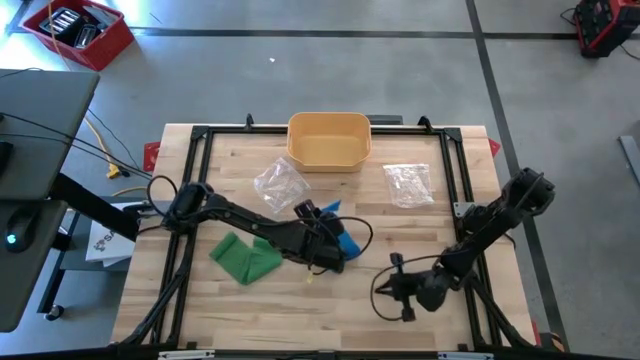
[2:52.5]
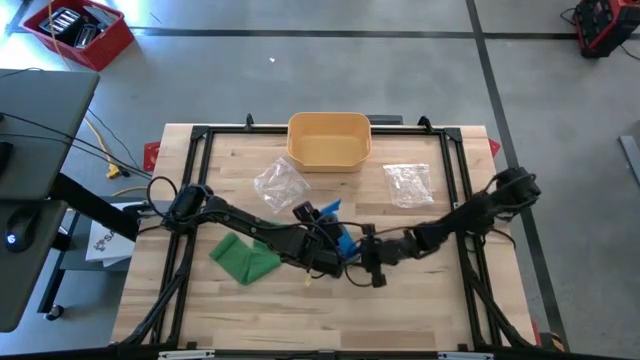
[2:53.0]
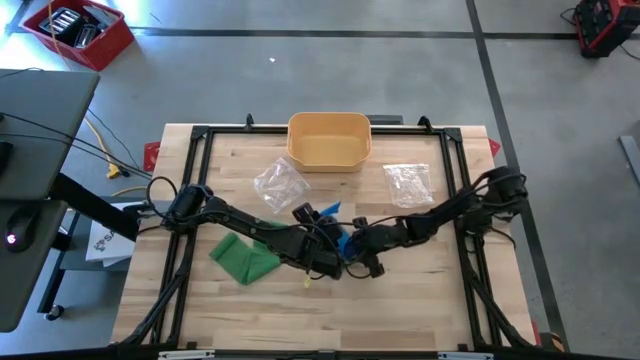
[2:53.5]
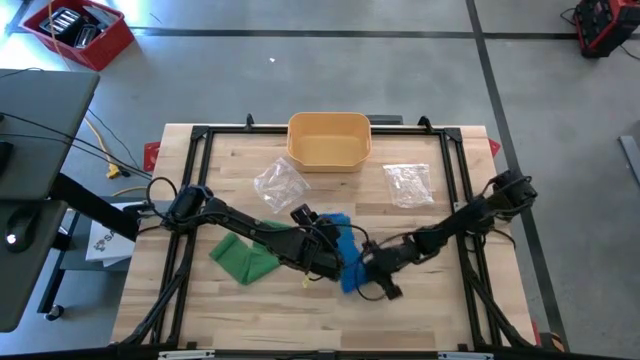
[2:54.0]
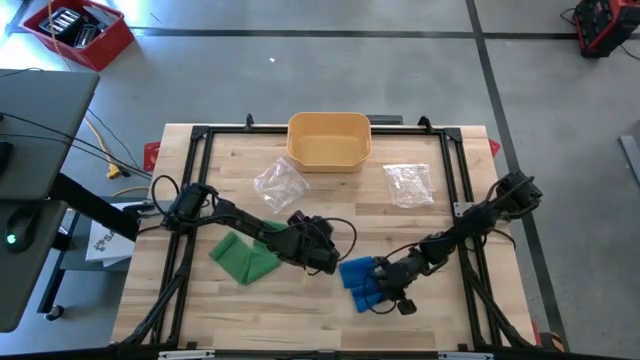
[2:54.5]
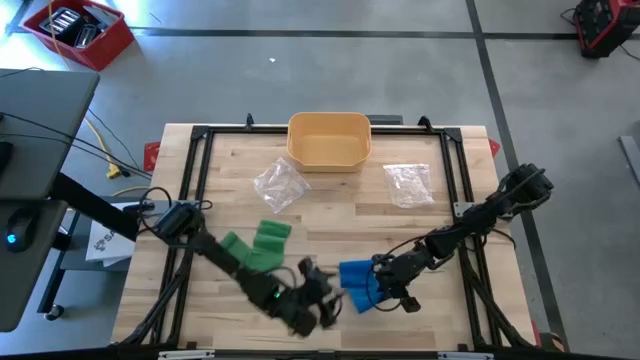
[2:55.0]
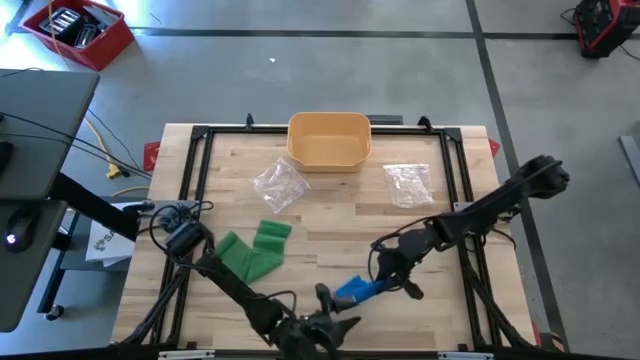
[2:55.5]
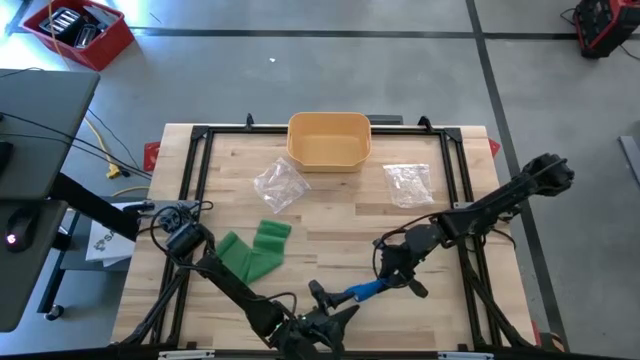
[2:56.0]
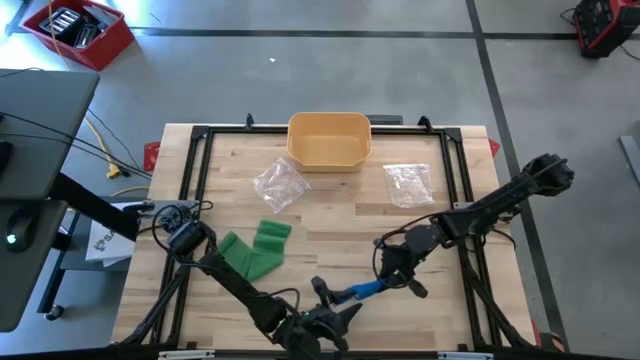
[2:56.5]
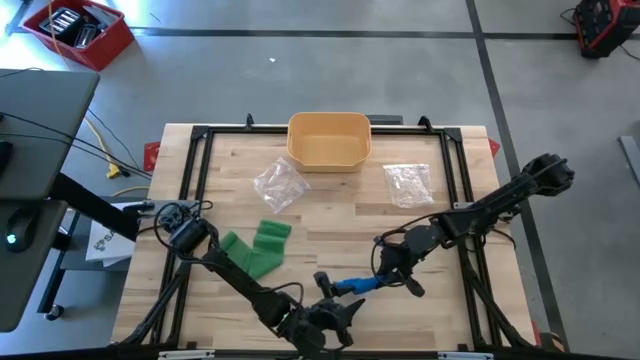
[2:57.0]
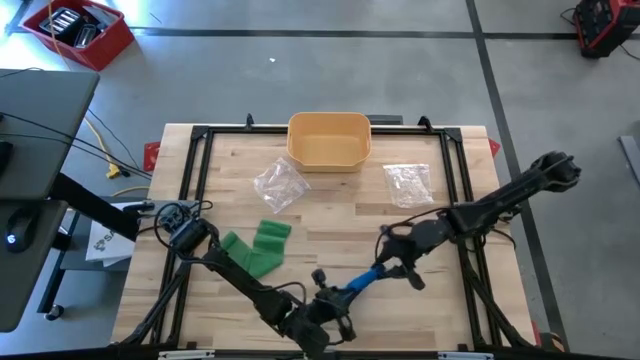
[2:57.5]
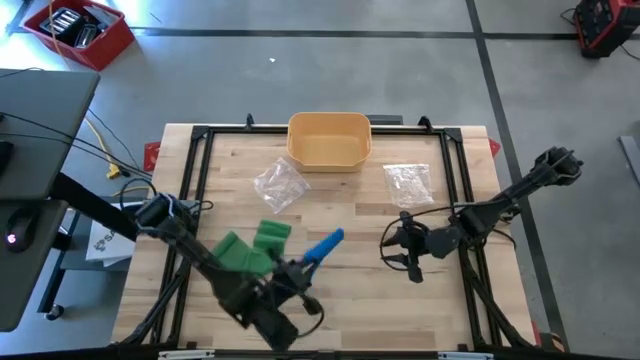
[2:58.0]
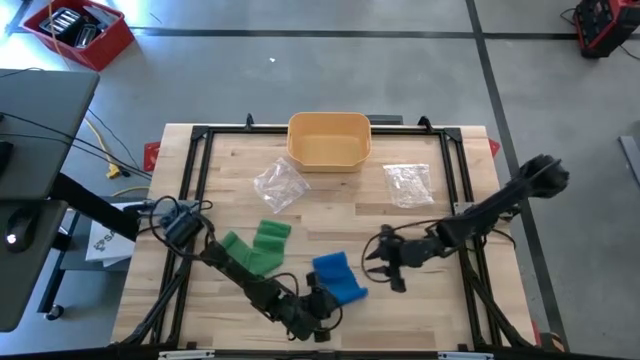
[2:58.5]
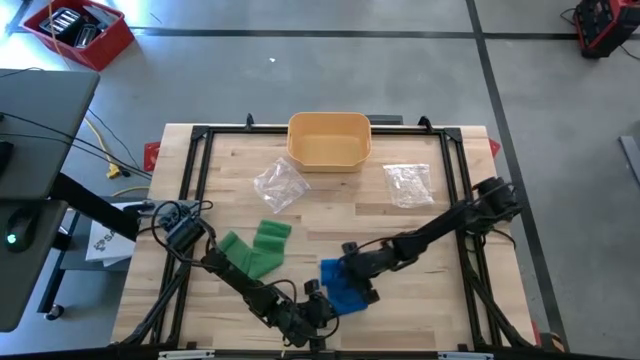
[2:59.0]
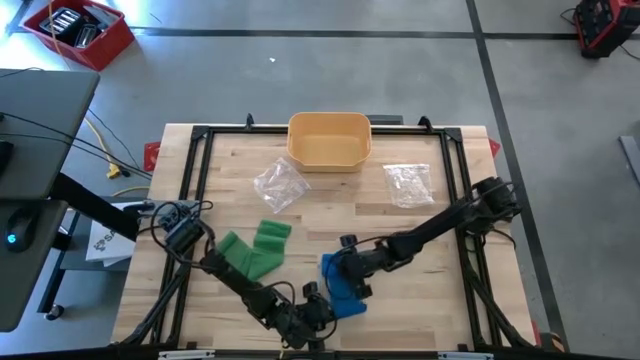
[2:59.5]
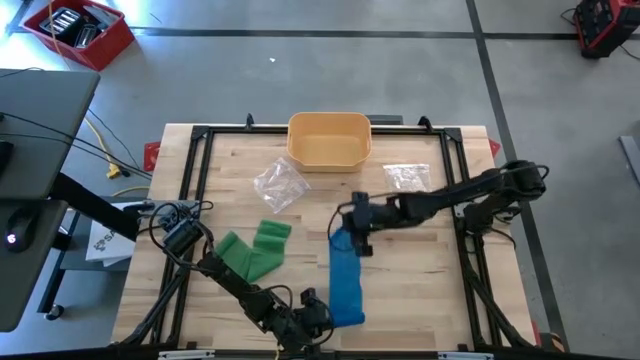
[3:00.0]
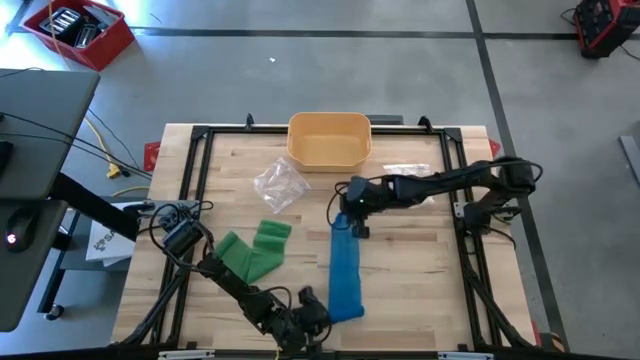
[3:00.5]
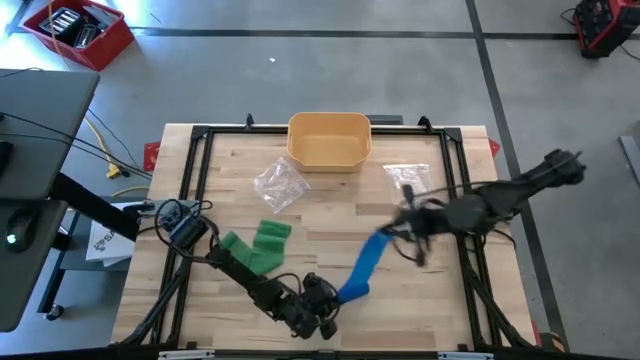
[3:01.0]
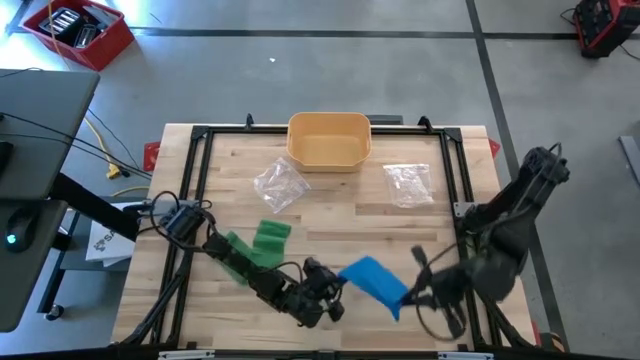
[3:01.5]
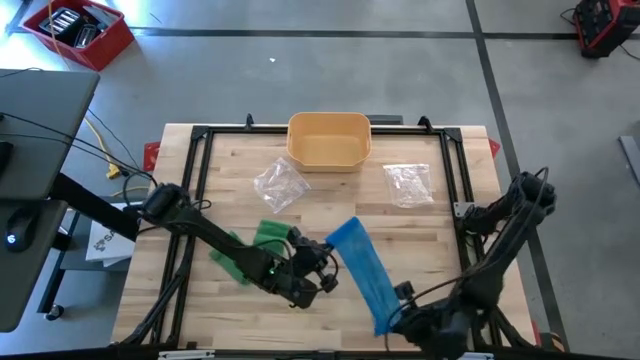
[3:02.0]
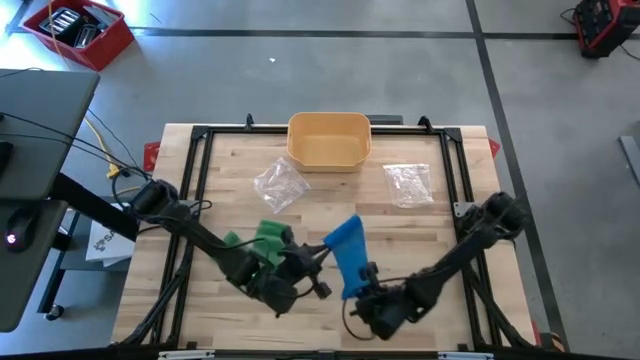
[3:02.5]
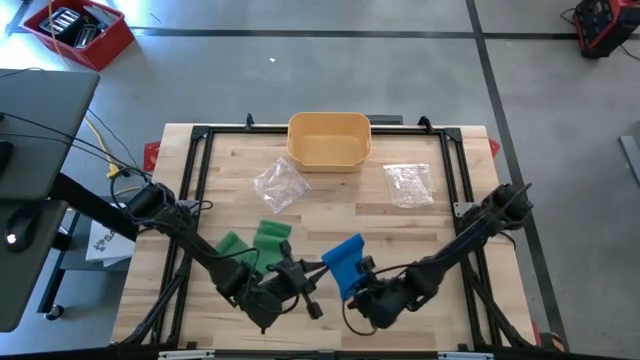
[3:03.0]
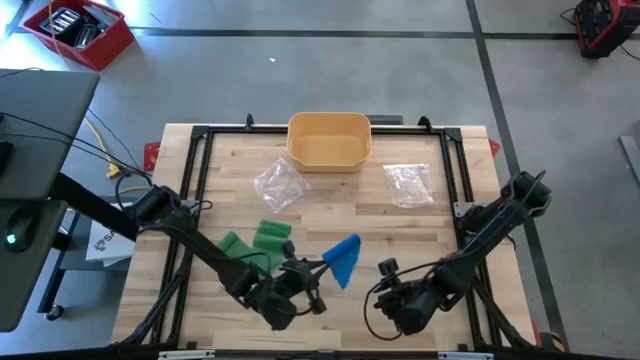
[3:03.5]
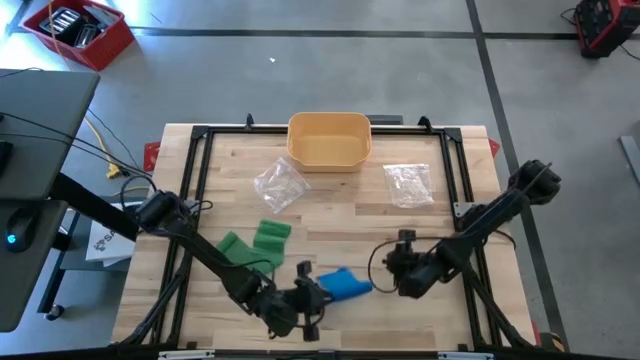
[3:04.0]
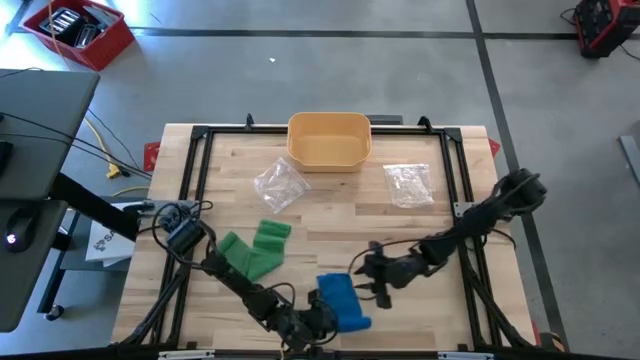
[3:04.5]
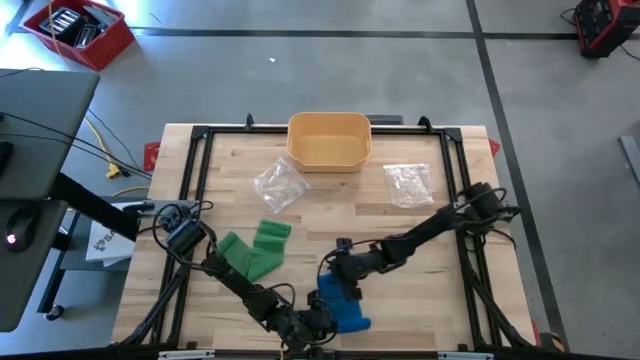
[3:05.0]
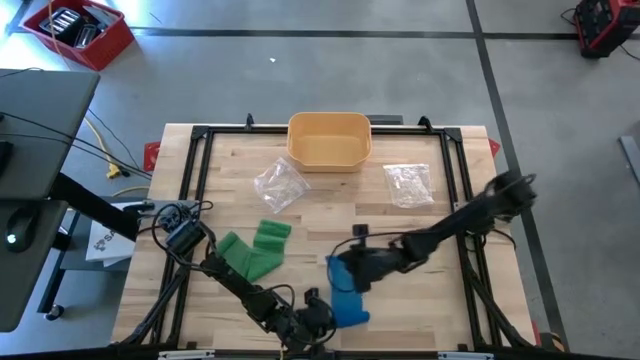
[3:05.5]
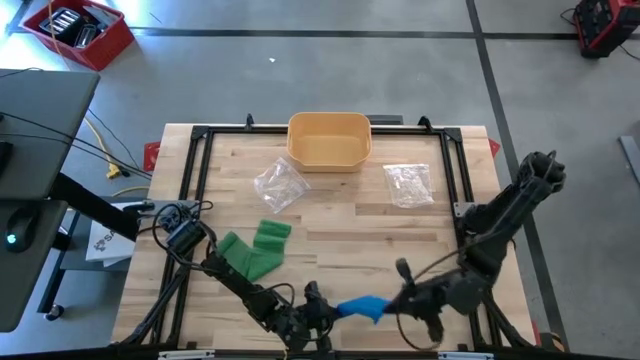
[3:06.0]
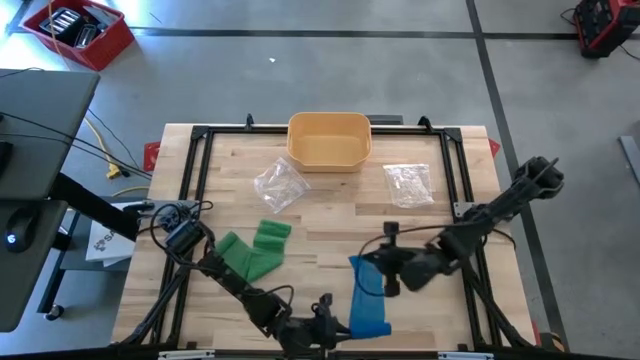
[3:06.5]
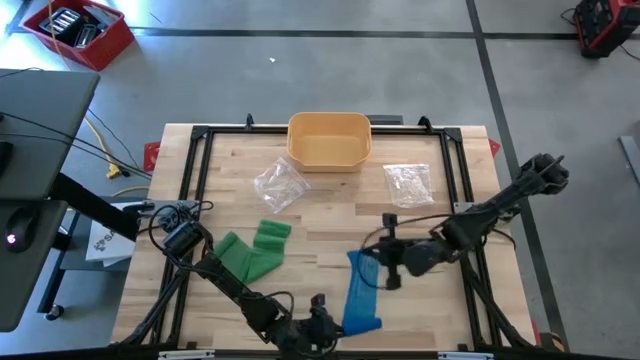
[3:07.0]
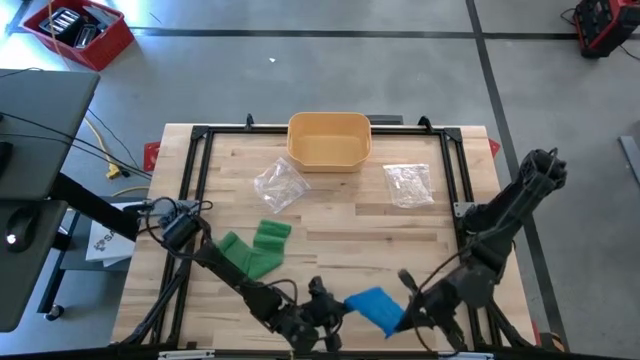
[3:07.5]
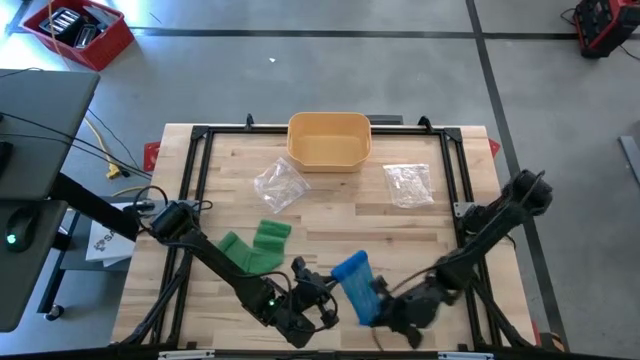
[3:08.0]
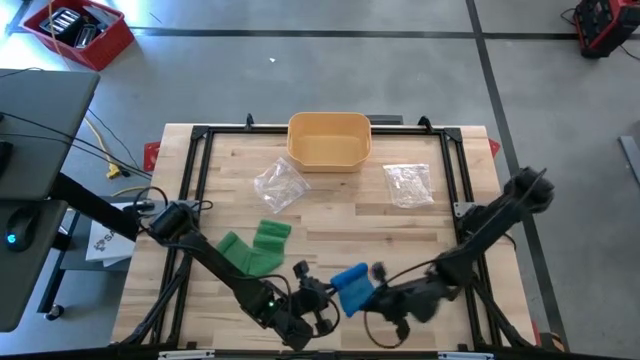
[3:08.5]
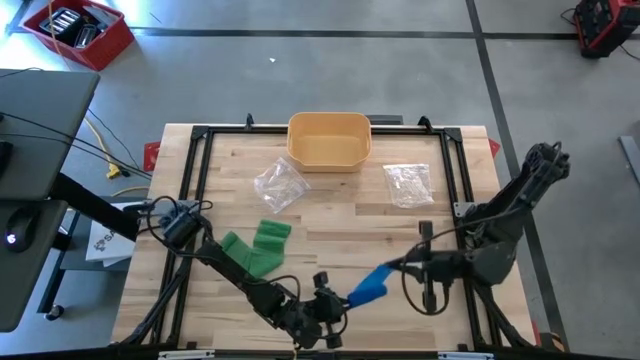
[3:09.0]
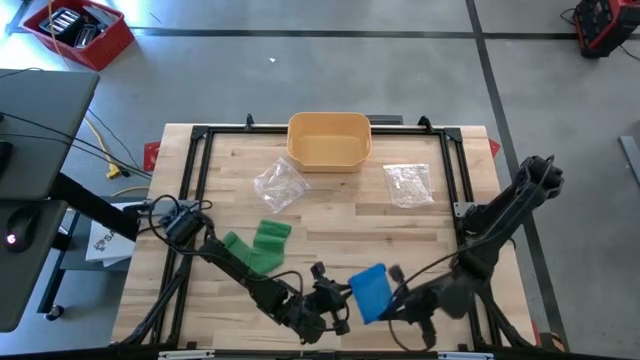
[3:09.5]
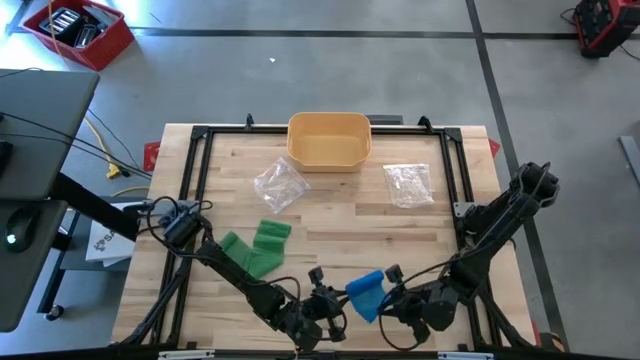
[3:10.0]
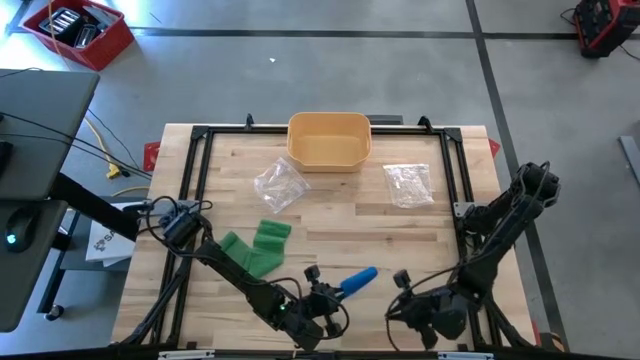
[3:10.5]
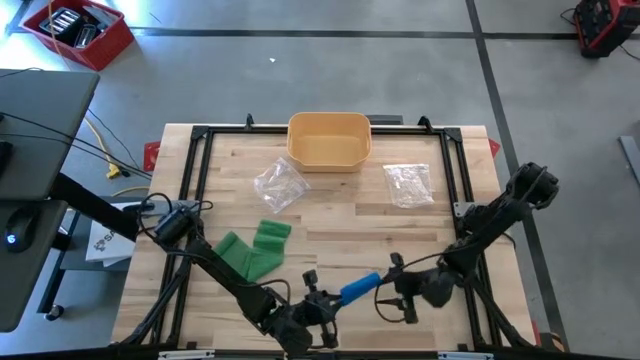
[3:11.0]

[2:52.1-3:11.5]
Task: Roll bandage
Roll the blue bandage

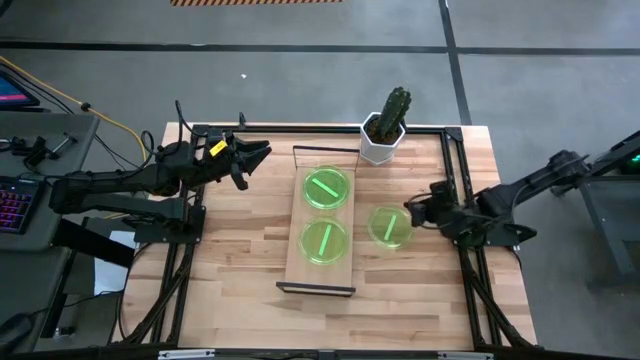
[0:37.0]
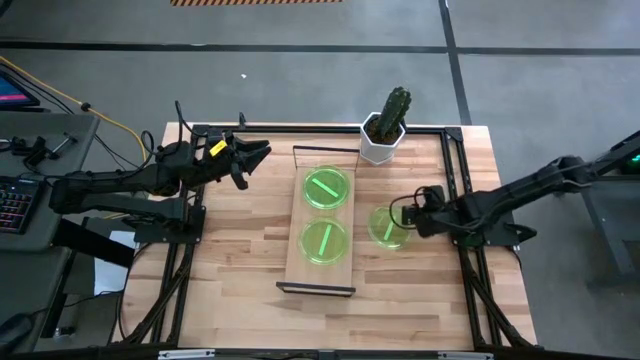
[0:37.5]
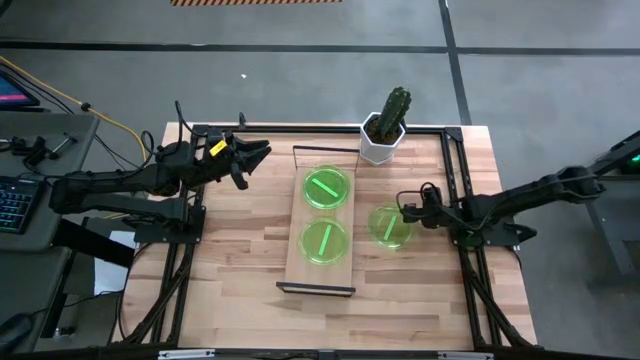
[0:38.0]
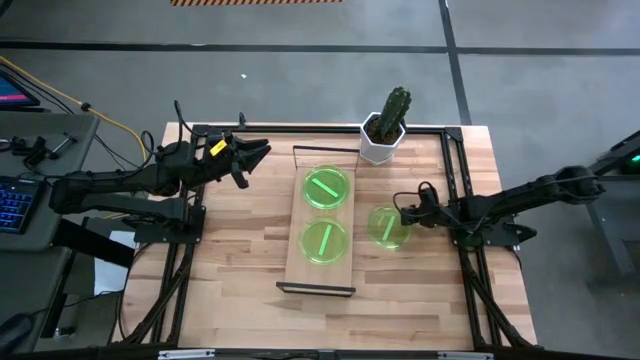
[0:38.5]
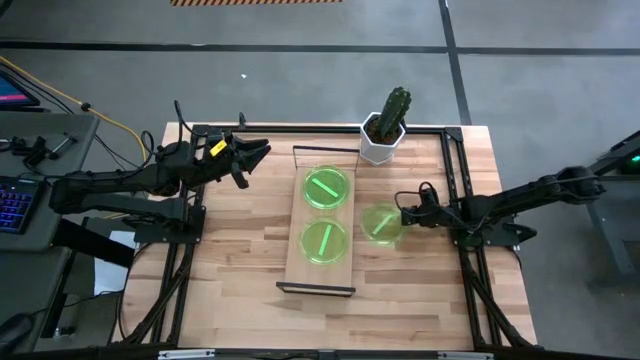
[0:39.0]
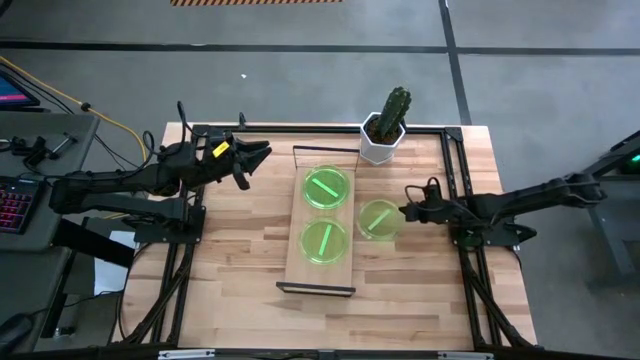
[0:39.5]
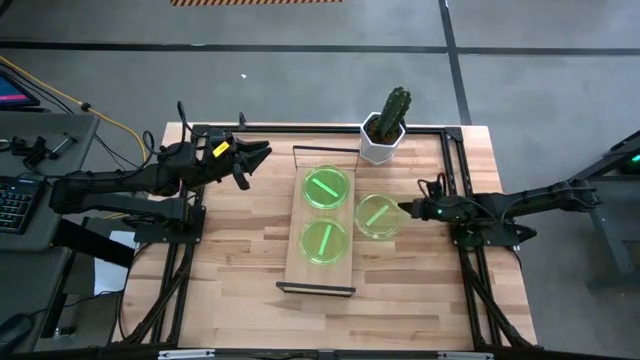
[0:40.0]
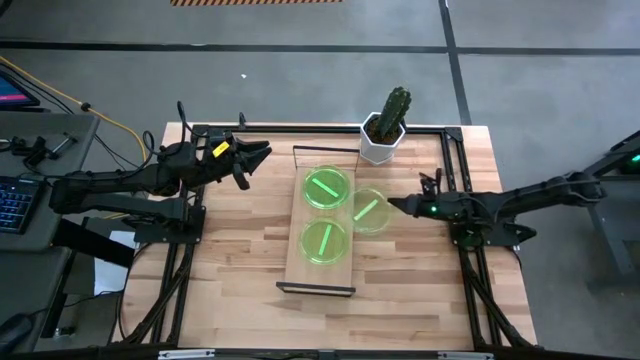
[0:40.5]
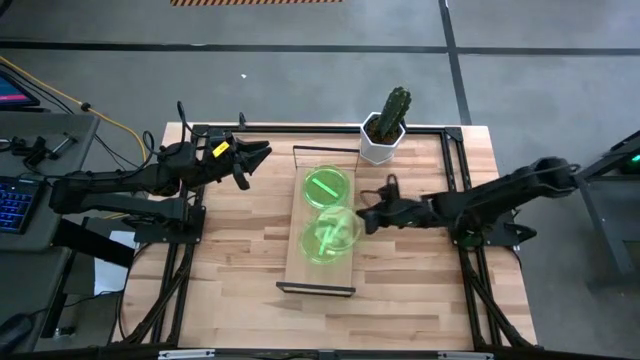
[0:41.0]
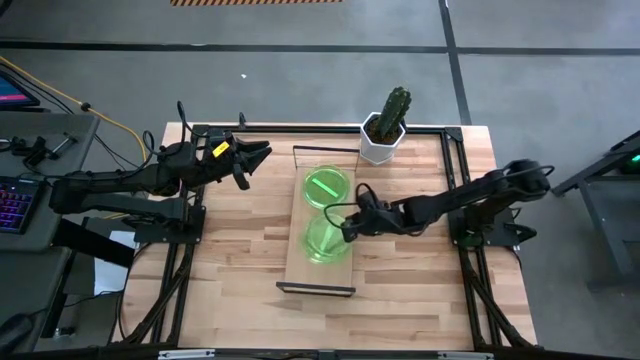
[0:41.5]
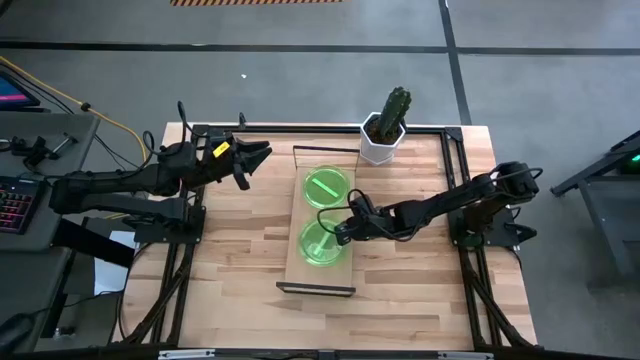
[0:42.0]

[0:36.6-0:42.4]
Task: Place and stack plates onto a shelf
Stack the green plate on top of the green plate on the shelf
